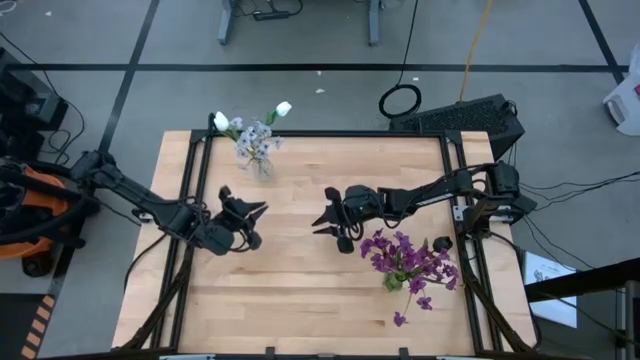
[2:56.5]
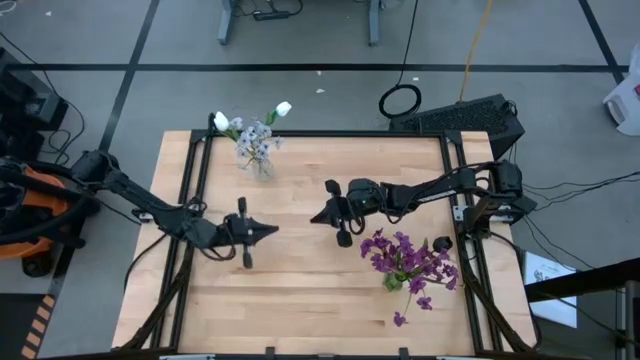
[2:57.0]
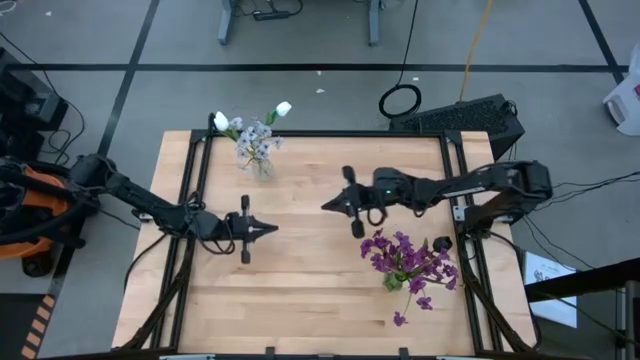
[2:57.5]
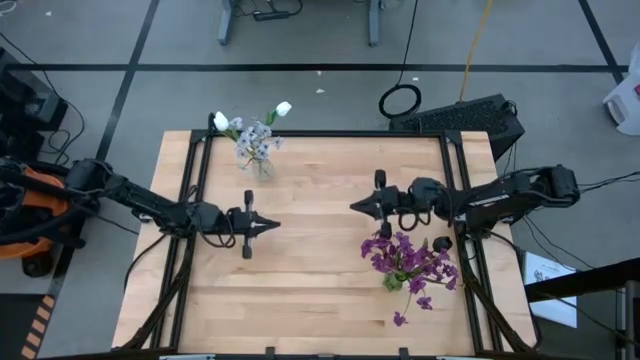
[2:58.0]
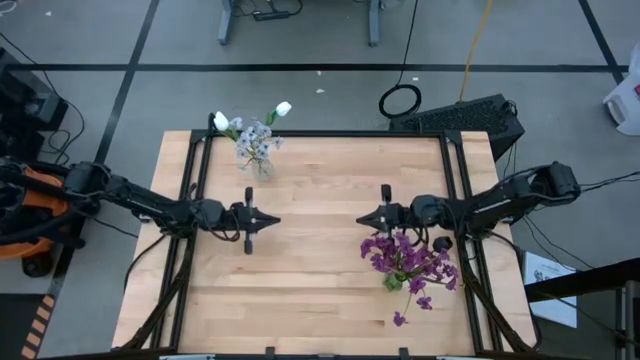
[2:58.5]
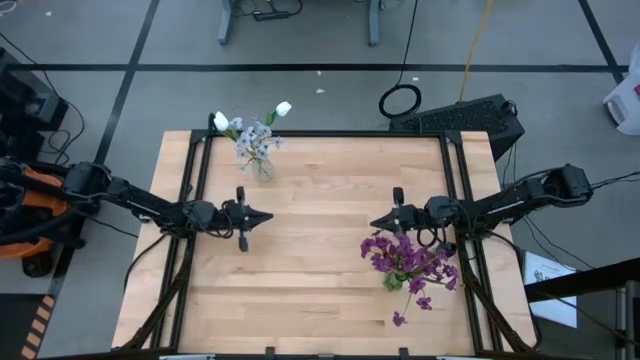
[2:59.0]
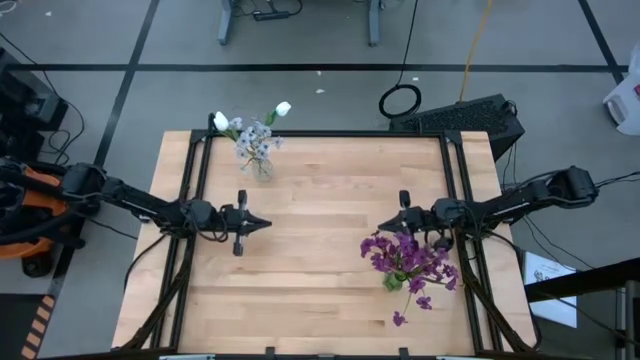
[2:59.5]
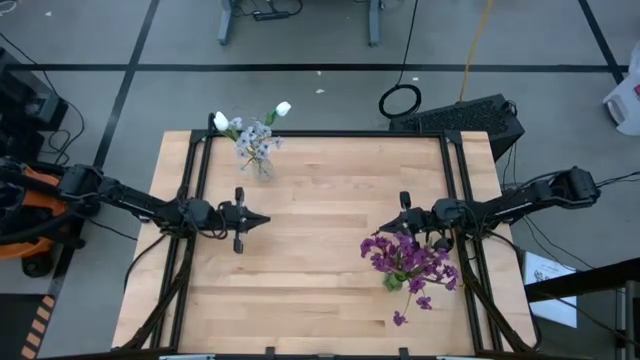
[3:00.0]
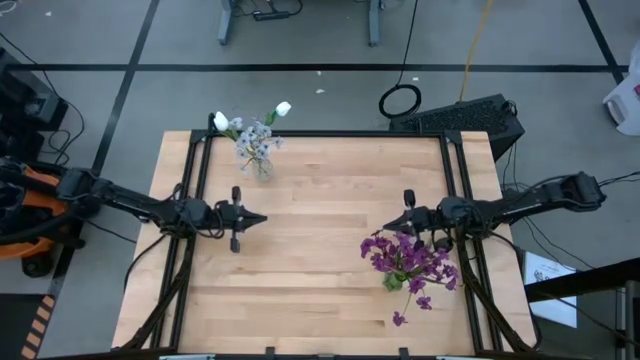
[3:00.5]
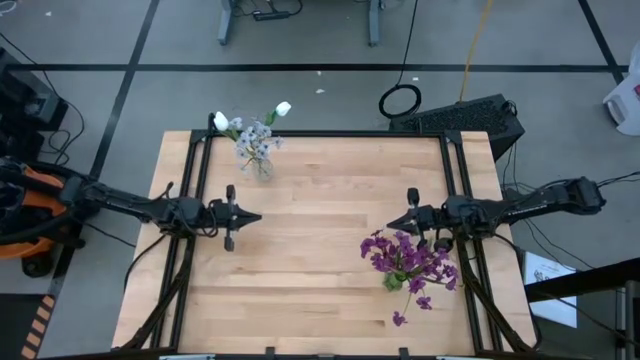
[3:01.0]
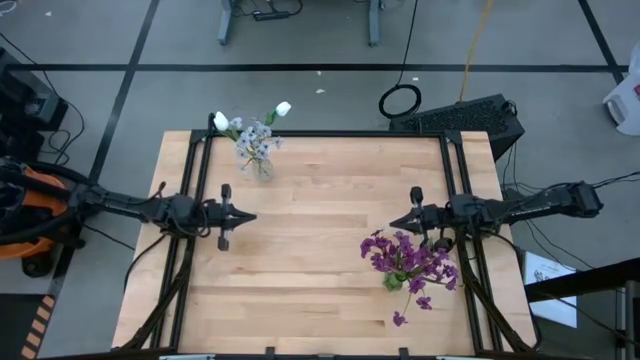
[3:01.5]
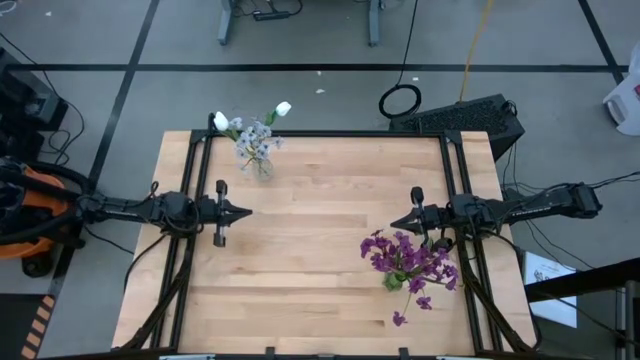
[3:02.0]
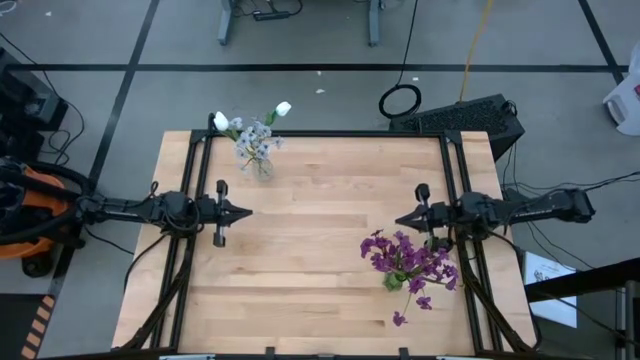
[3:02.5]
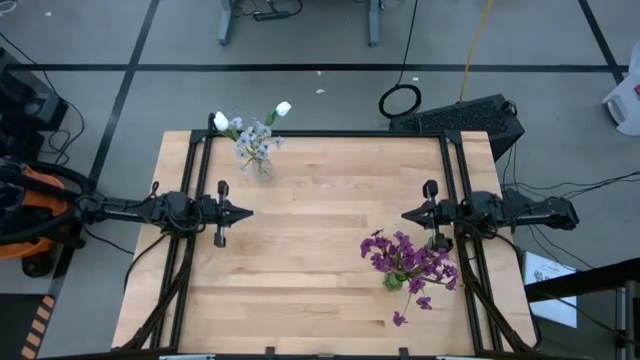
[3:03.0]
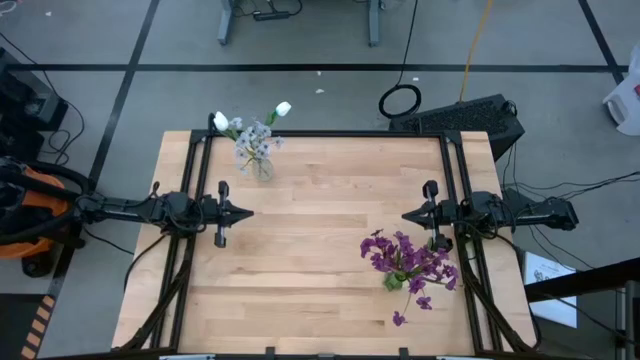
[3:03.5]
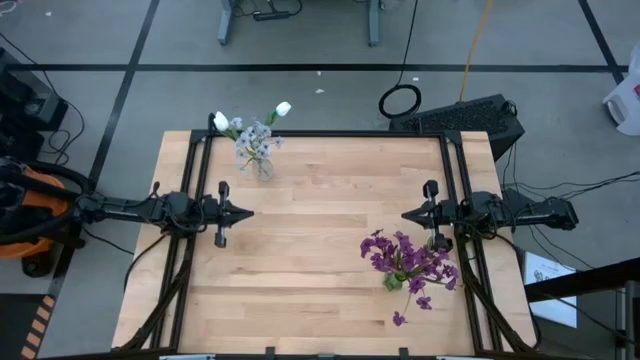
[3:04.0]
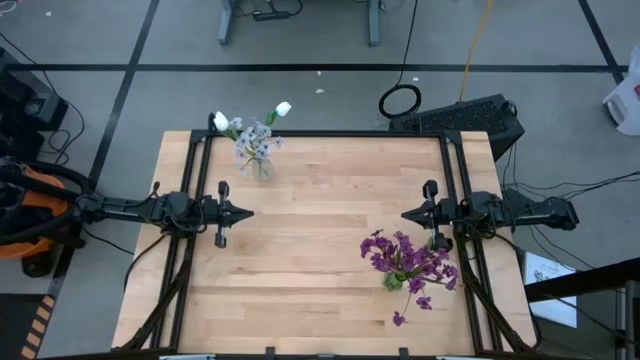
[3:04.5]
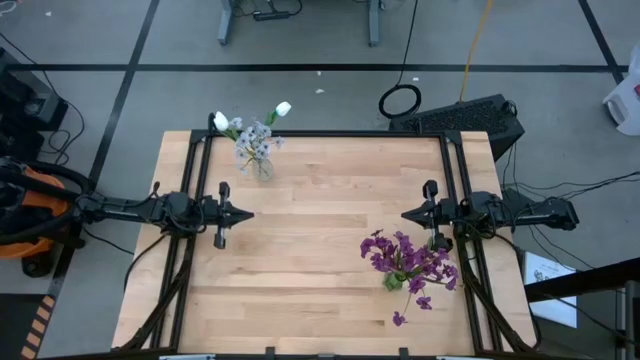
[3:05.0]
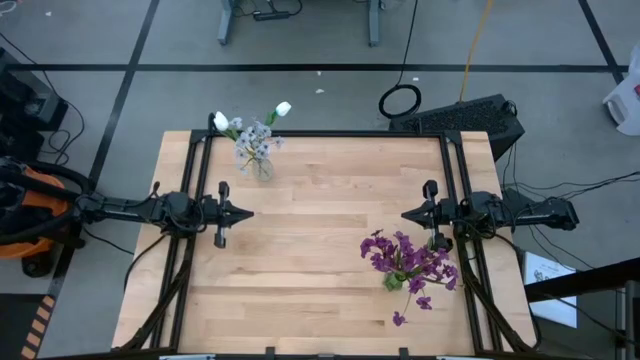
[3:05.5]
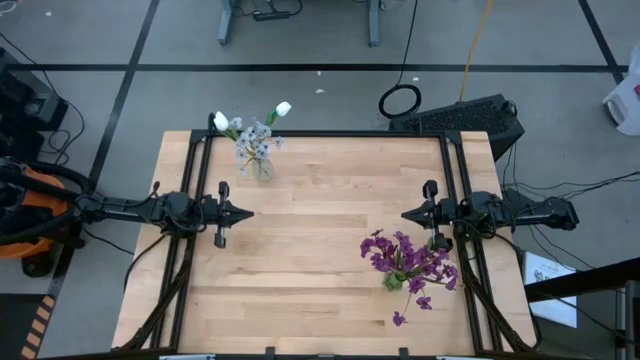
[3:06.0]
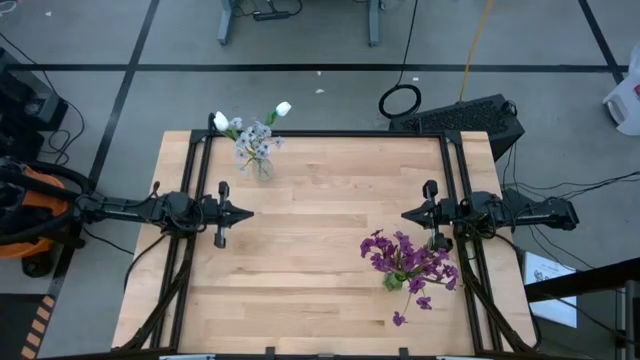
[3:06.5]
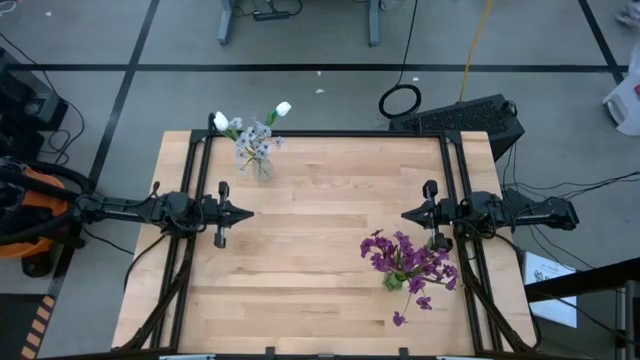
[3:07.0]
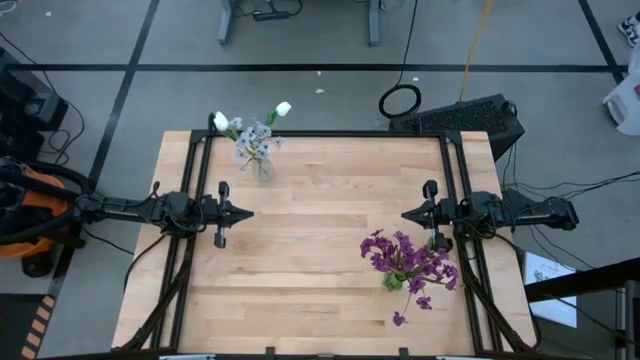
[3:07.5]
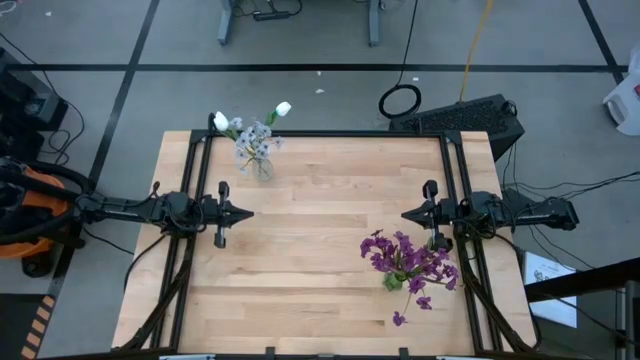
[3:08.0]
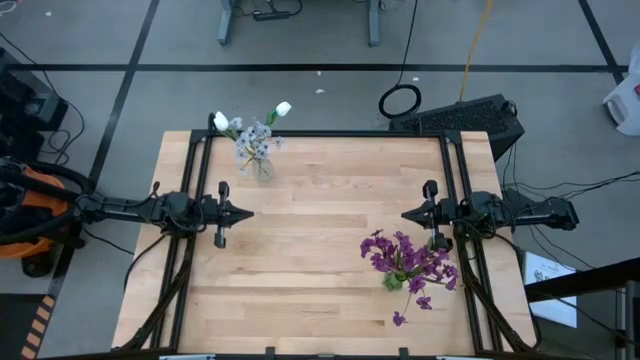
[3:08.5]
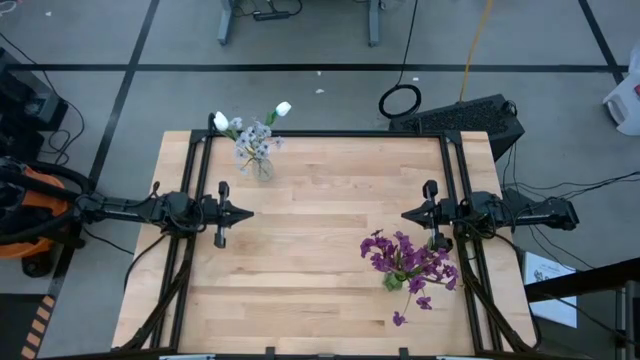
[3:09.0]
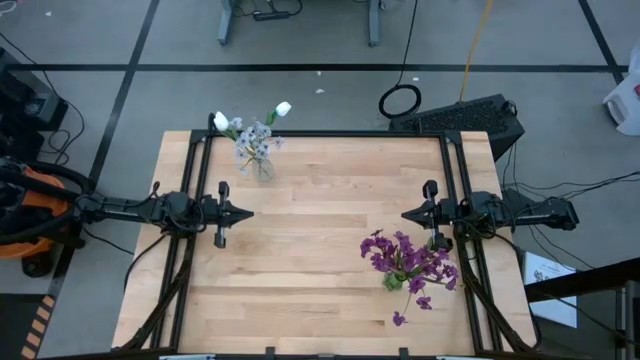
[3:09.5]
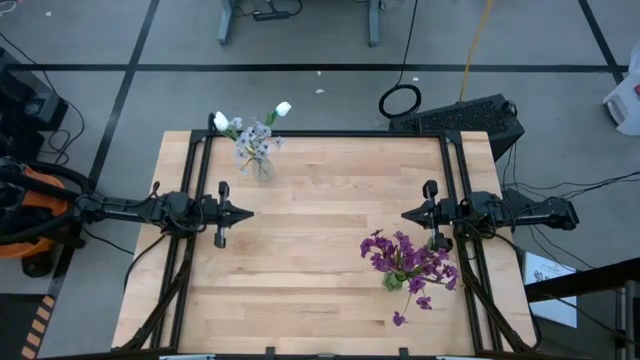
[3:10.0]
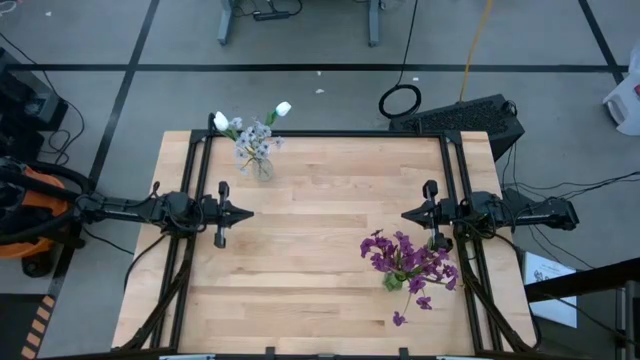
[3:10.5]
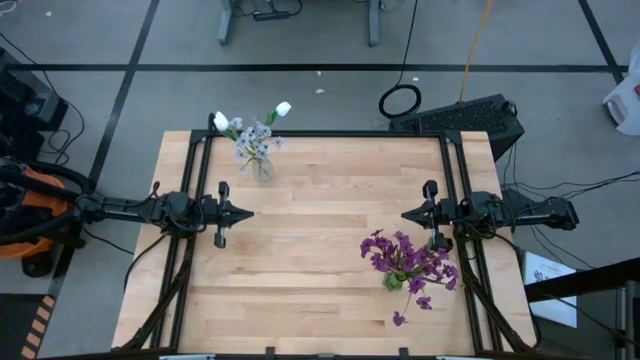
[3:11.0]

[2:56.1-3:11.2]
Task: Sort flowers into vase by color
Return to Home Position

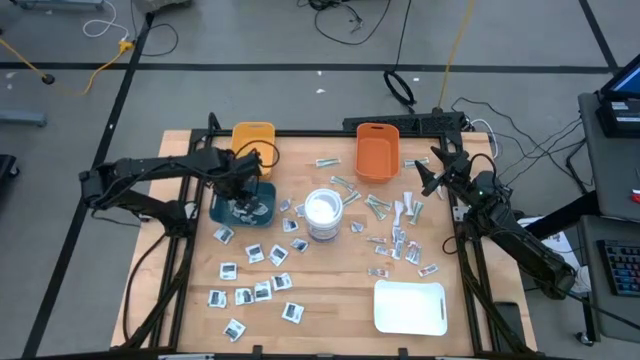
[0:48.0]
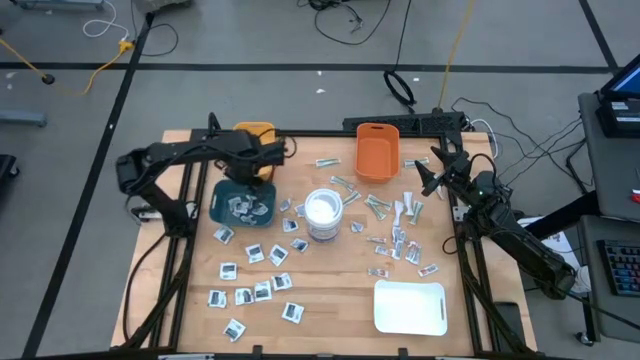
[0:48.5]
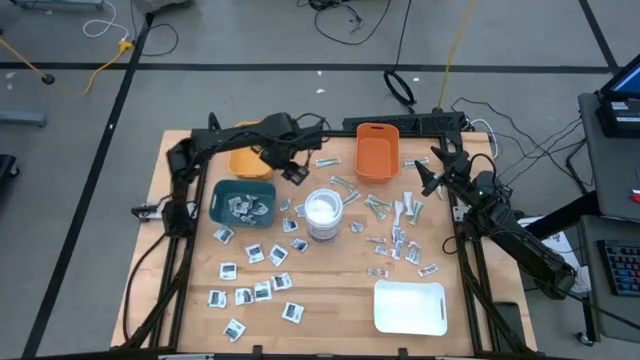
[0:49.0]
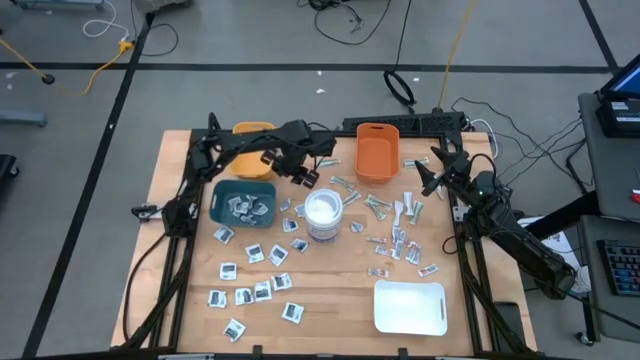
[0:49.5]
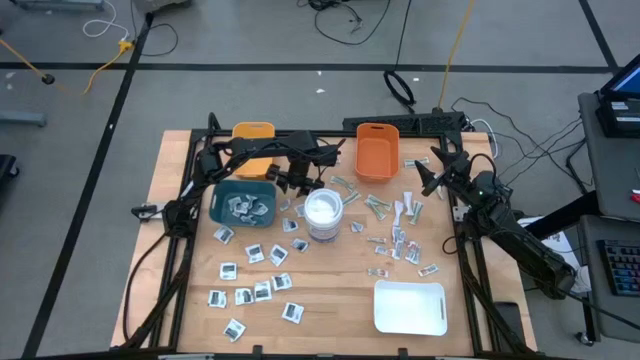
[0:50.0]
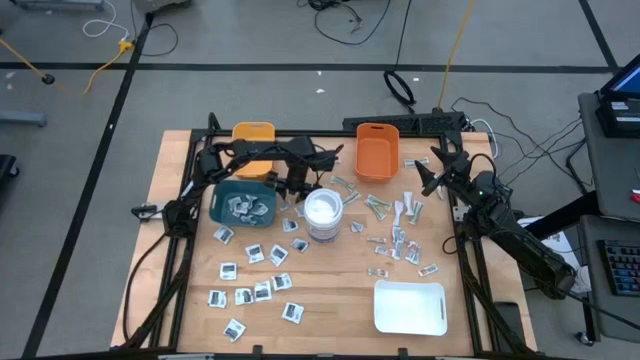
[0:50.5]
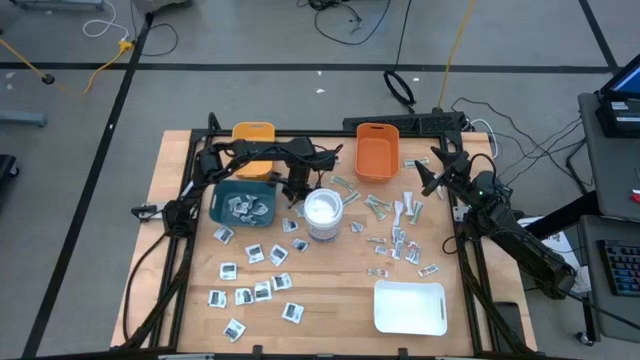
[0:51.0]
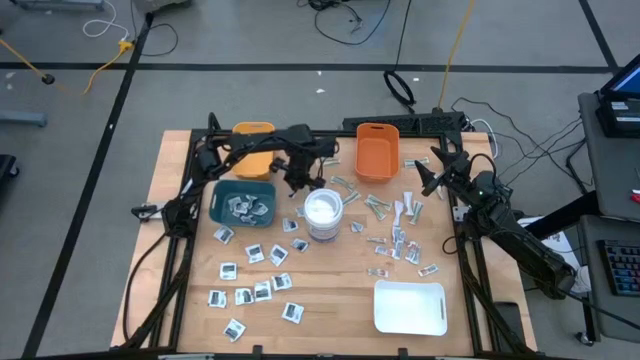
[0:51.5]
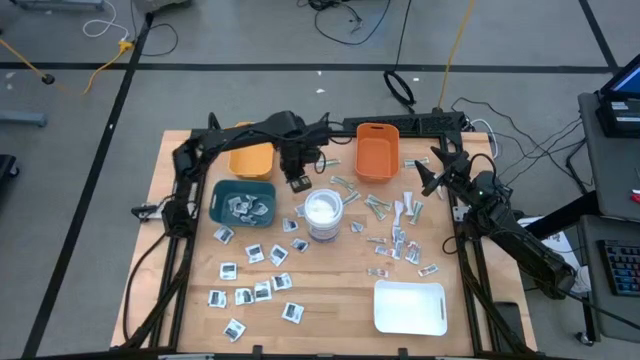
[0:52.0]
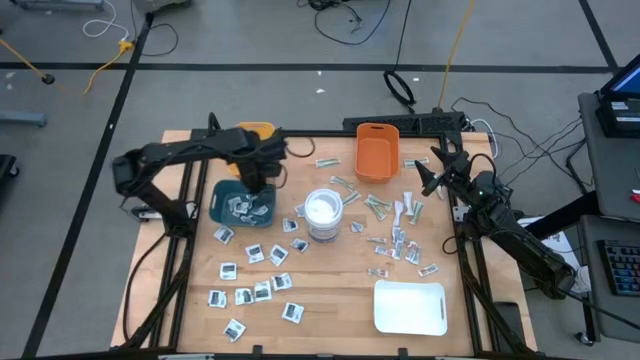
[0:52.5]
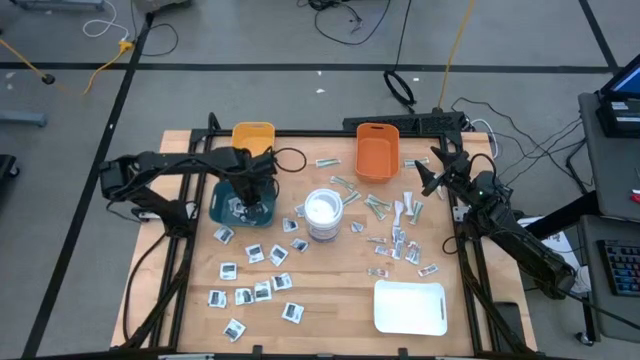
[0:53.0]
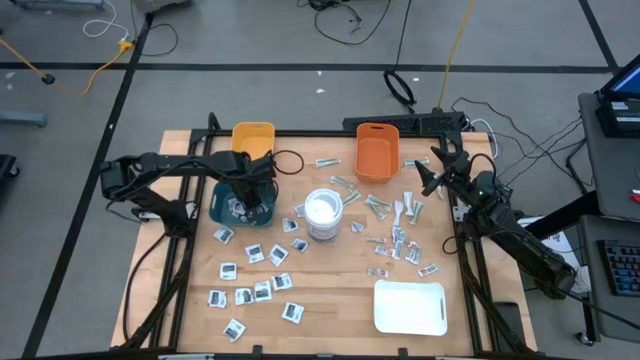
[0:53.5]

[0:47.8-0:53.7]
Task: Pick & Place First Aid Supplies
Put the blue pad into the blue bin
